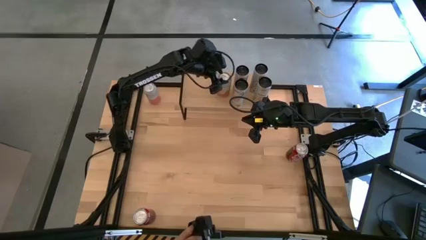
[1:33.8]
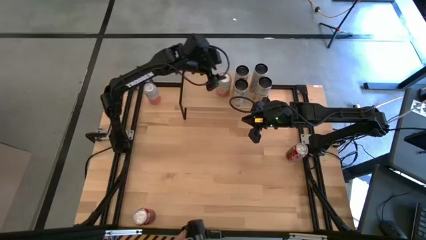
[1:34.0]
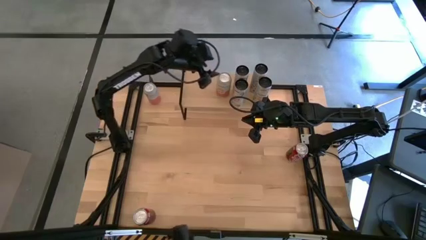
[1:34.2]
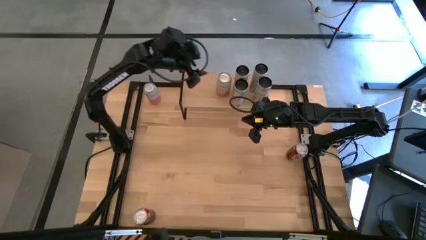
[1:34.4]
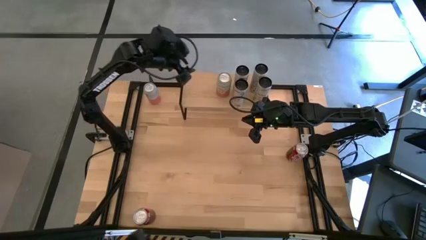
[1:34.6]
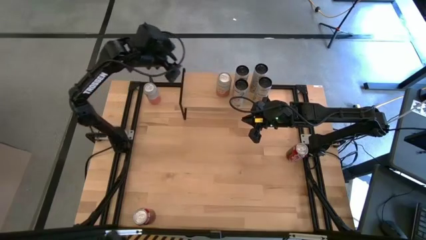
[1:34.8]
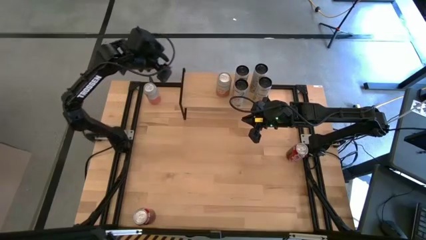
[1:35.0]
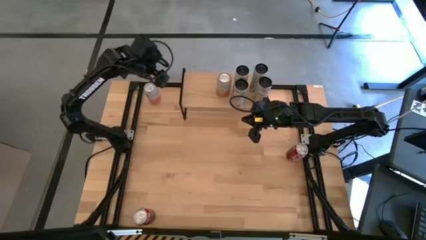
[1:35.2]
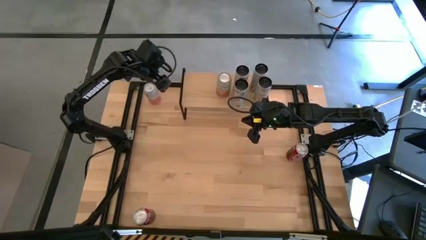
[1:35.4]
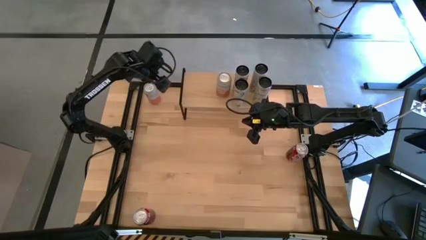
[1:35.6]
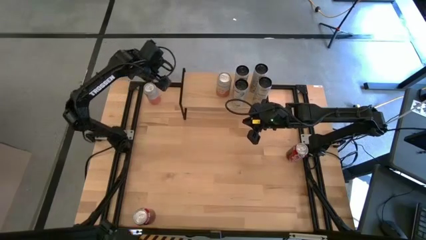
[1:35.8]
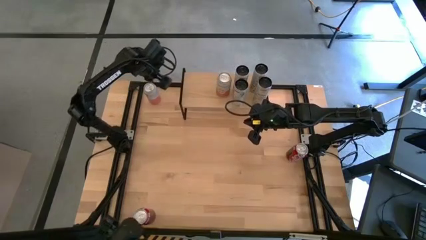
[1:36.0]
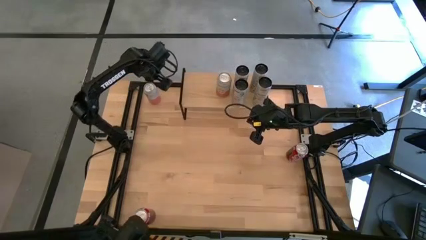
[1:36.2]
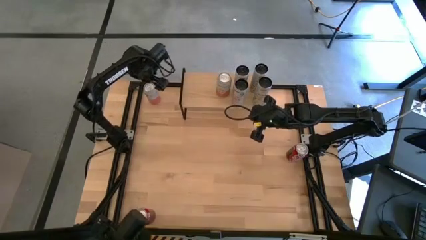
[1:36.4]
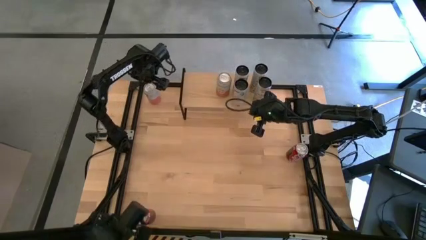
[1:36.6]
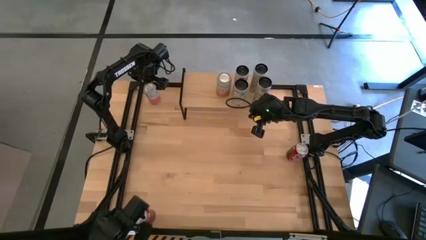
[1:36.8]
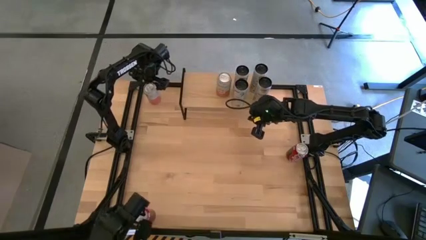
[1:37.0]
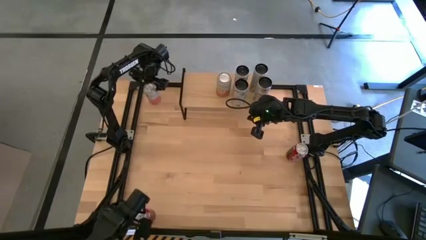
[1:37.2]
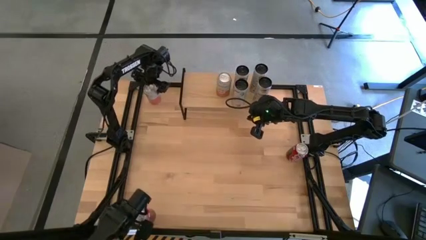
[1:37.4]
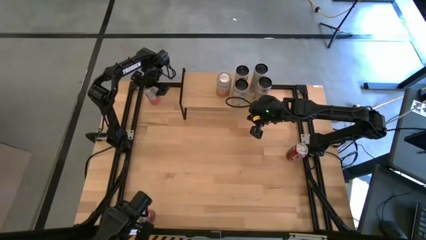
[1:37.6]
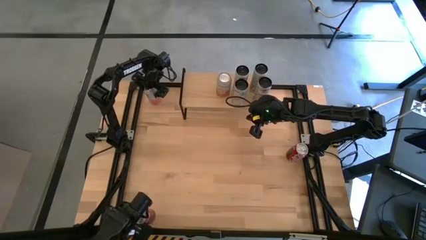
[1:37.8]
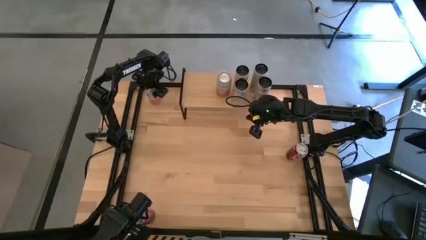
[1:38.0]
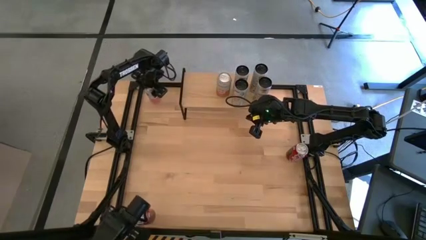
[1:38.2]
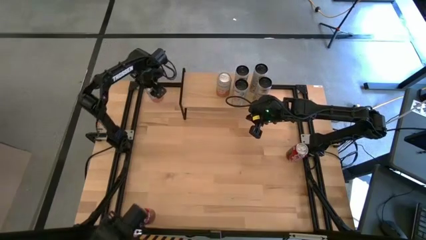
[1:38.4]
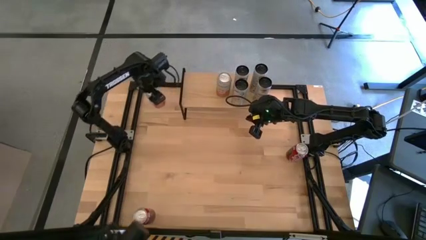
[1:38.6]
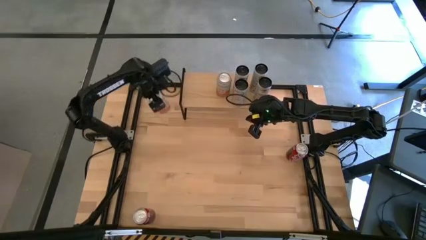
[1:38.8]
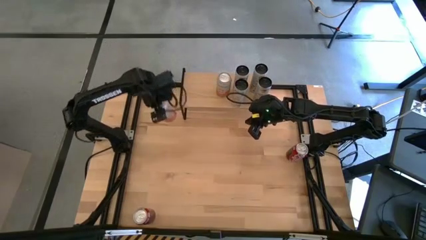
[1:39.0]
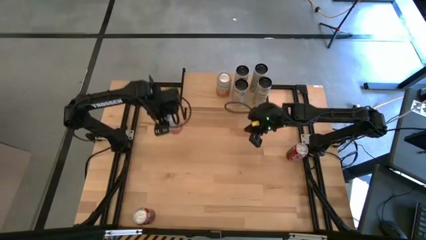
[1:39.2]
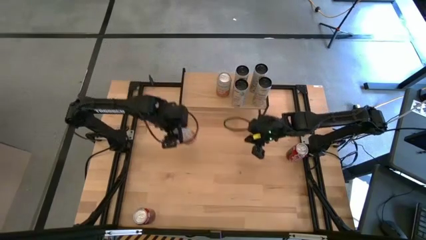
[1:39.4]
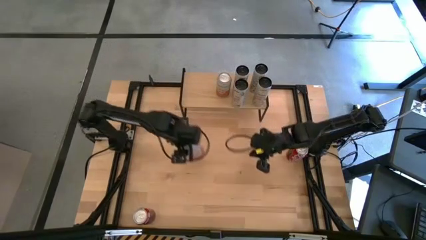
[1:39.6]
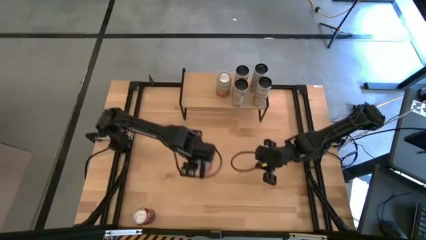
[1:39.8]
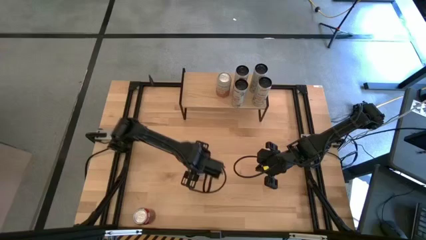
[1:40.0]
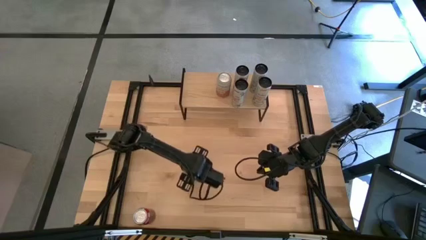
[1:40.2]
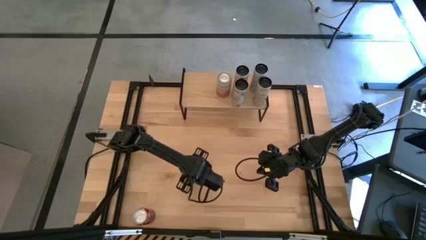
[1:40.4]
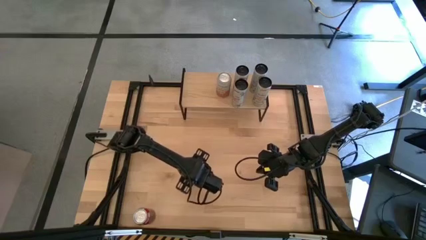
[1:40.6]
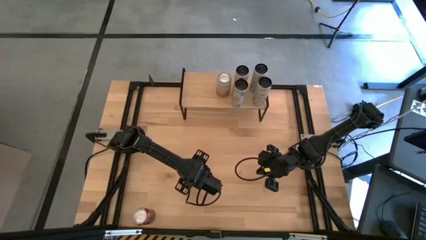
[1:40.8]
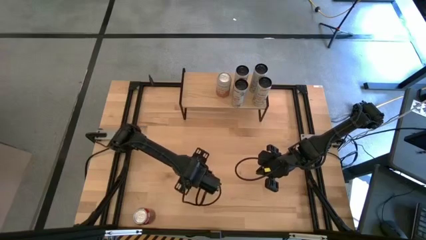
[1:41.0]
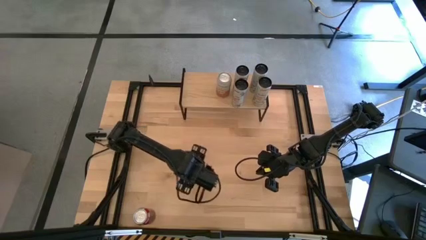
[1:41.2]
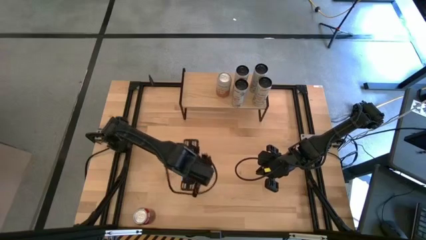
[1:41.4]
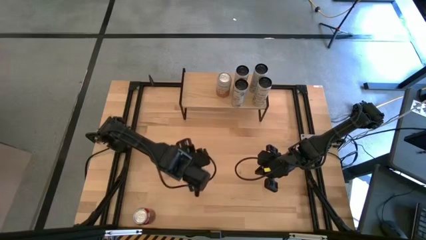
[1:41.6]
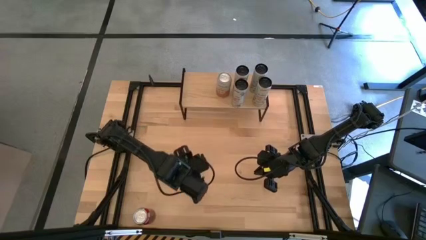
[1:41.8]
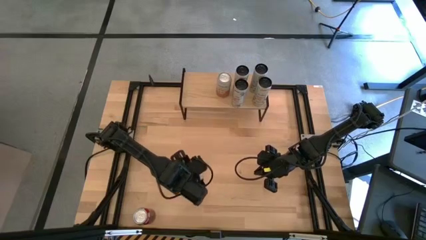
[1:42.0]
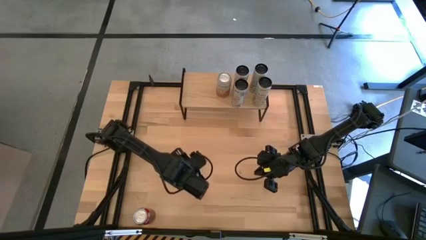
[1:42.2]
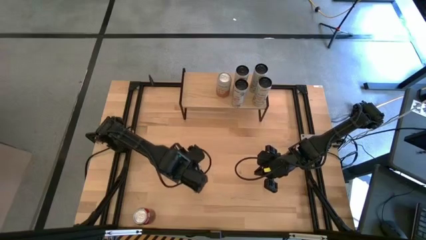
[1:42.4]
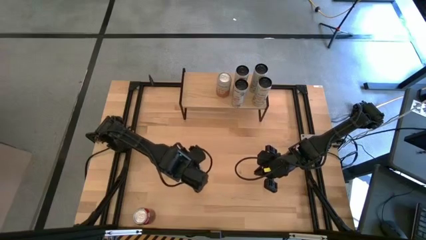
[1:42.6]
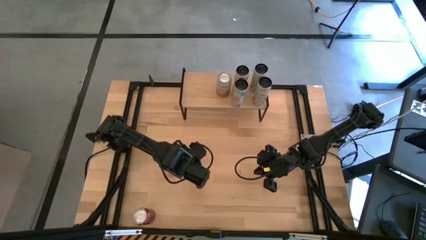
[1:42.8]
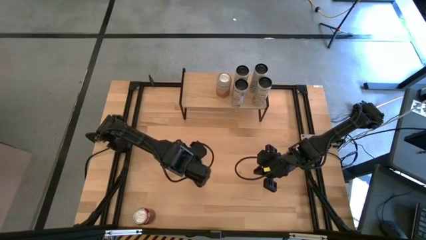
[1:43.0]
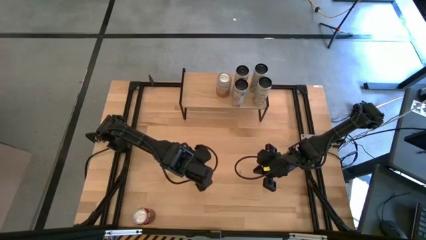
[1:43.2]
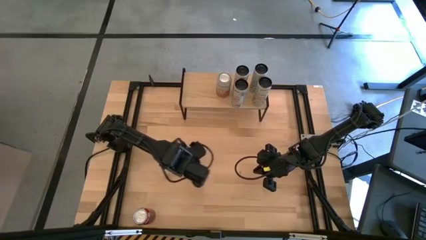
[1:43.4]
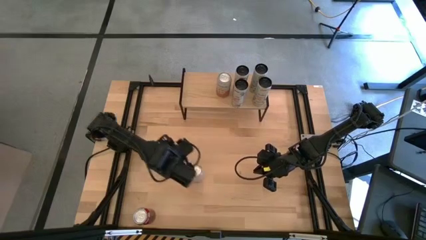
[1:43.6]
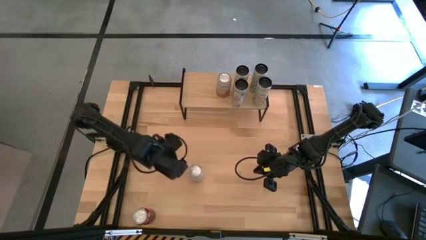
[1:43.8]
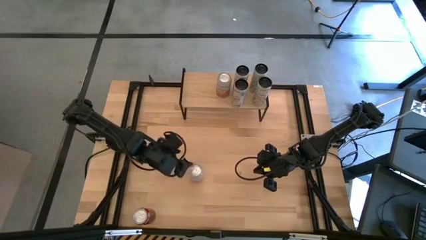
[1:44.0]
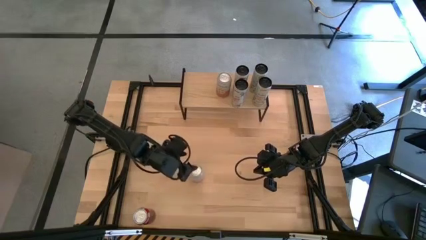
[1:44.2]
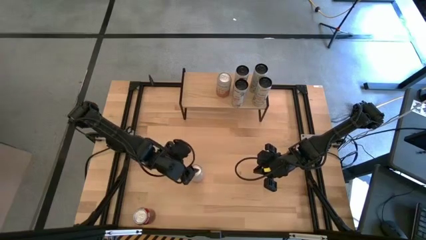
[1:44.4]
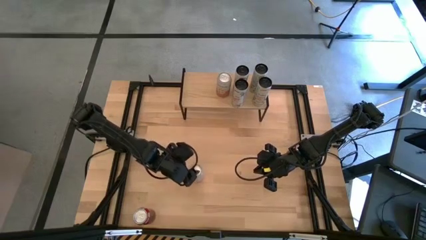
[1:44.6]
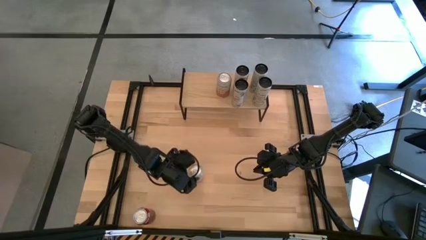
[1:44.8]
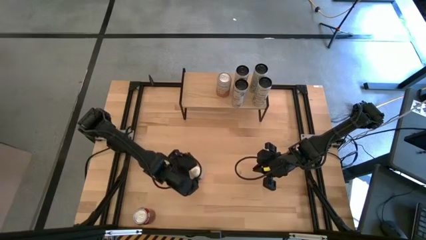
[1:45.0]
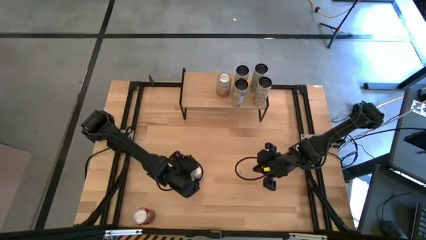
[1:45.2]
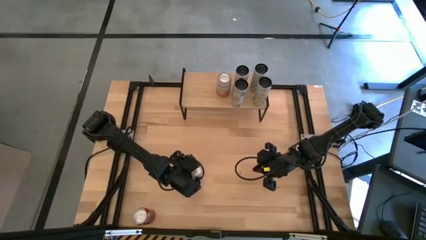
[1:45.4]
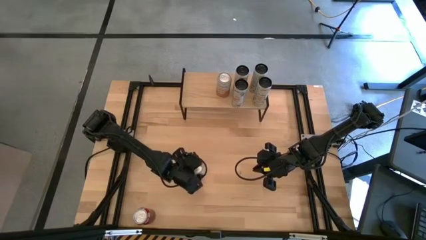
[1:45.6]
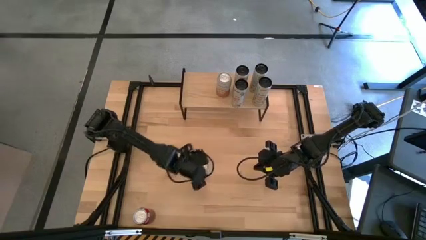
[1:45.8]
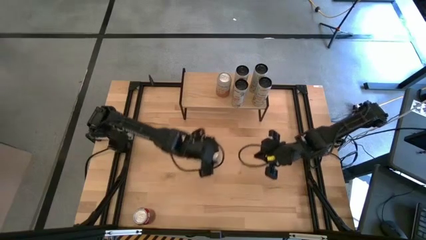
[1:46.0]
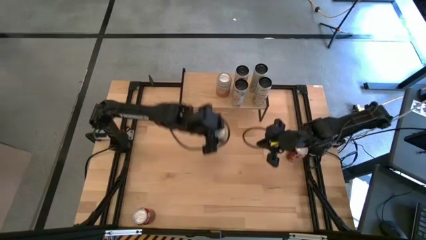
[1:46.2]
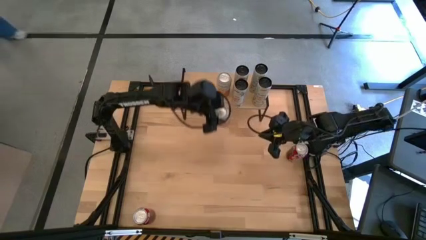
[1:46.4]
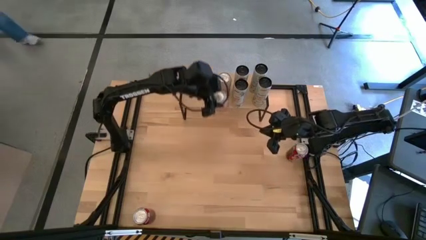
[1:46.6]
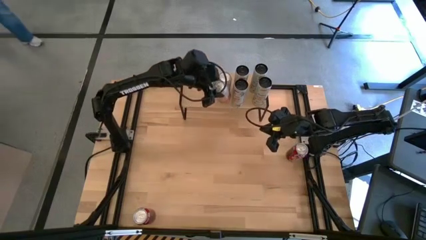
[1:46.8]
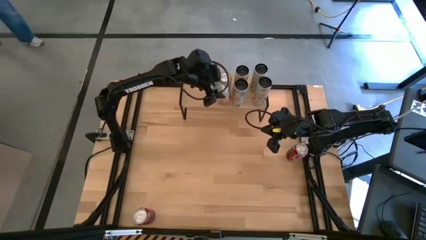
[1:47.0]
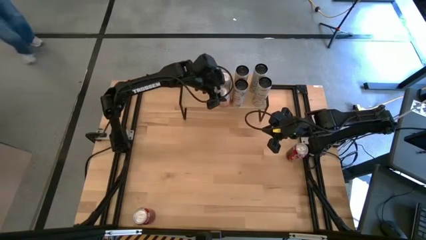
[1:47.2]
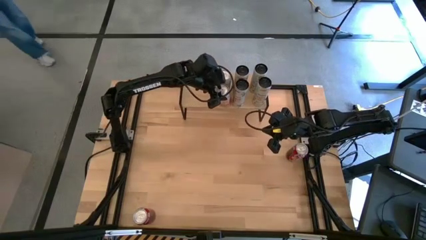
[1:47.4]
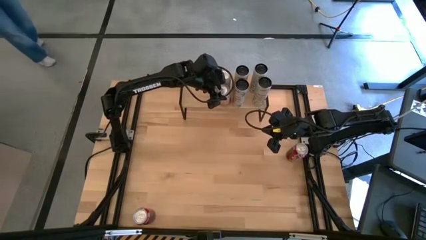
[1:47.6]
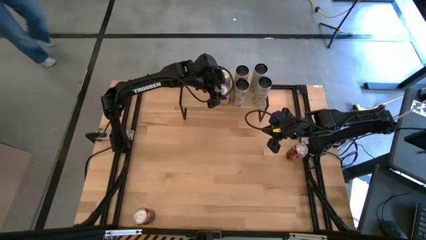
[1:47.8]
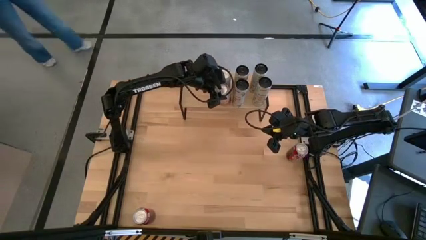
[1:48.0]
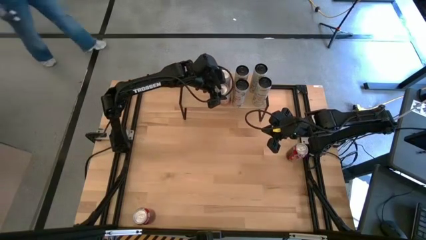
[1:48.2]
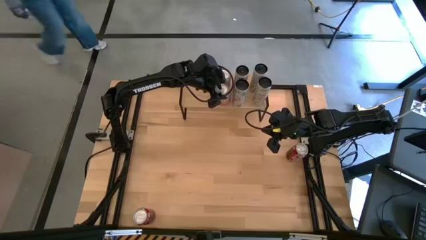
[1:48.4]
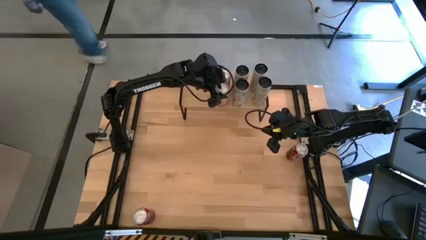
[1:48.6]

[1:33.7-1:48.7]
Task: Place canned beverage on shelf
Put the orange and white soda can aligned with other orange and white soda can on the shelf

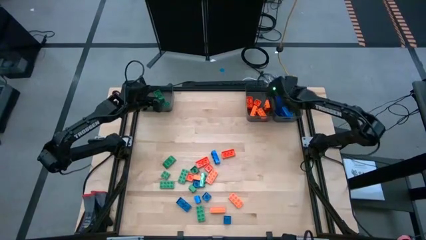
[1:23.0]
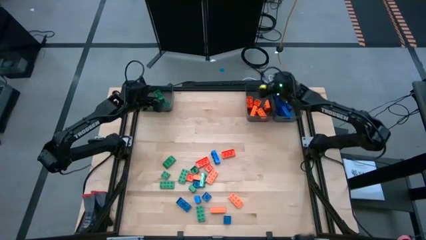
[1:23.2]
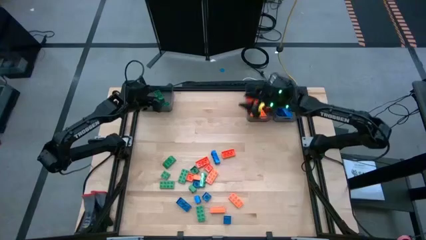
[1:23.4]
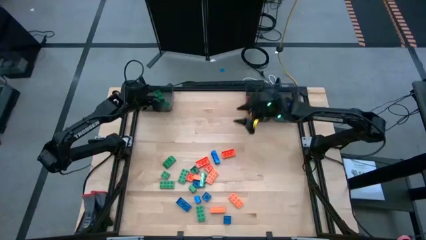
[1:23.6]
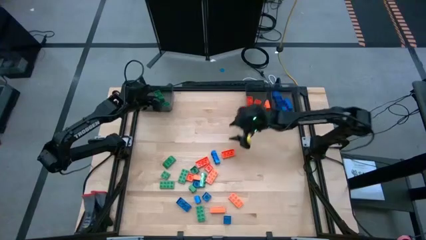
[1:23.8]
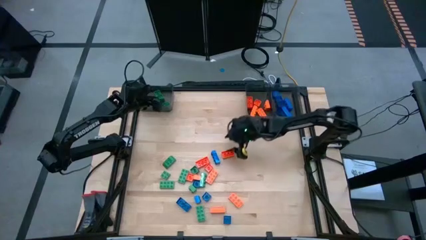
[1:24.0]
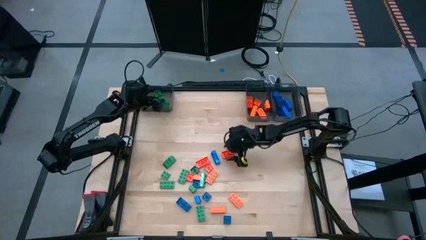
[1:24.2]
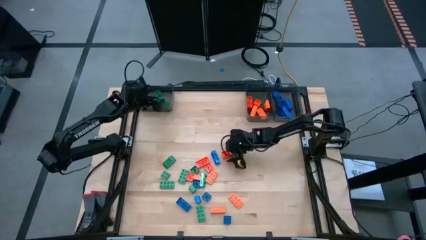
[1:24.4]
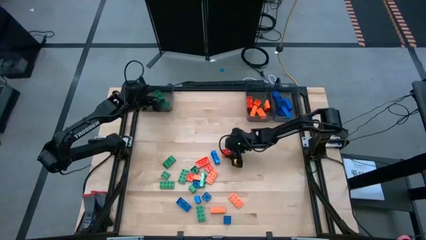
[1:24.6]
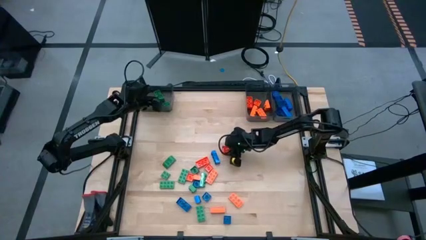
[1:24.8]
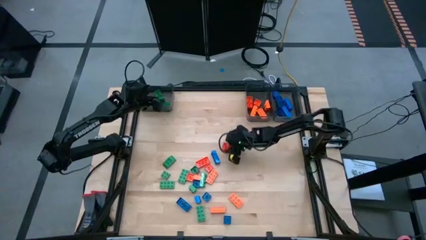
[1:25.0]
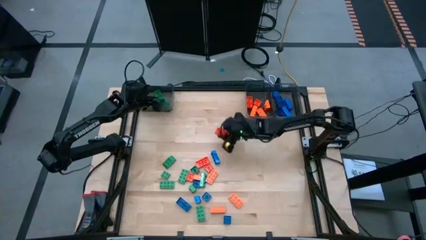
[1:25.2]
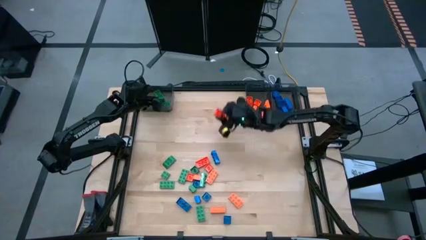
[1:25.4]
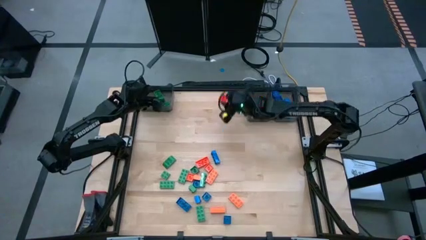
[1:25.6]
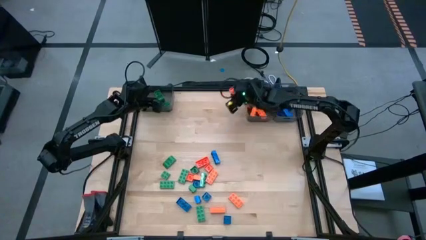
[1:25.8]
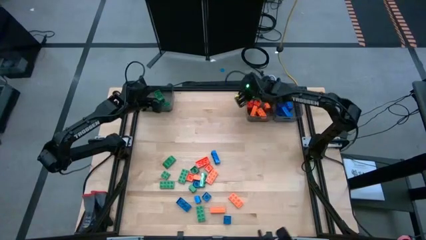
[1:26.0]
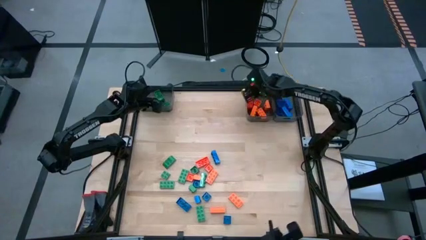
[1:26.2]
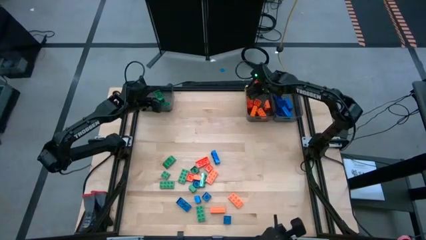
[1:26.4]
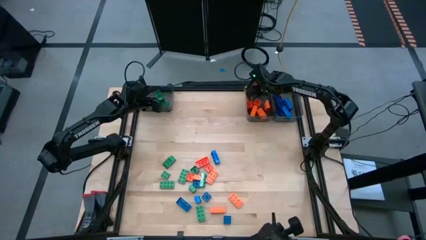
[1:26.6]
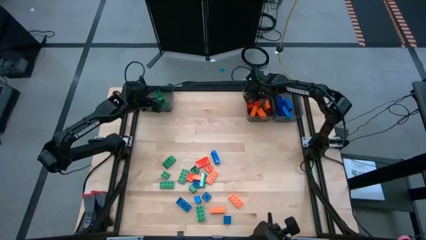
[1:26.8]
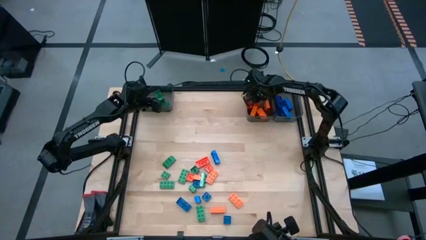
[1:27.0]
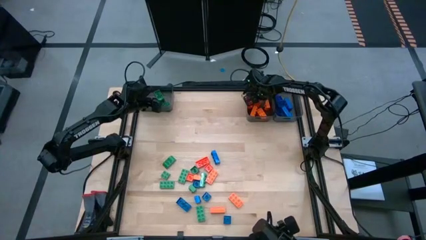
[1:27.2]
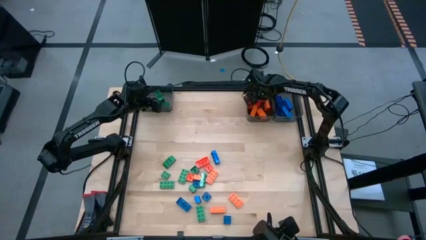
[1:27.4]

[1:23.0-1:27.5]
Task: Sort blocks
Put the orange game piece into the middle black bin
